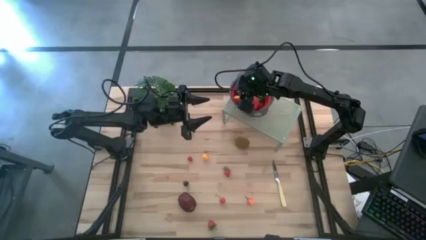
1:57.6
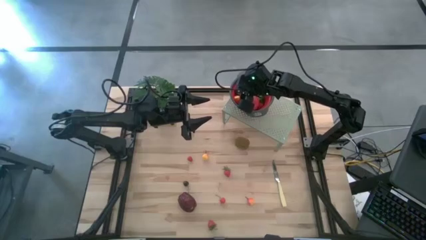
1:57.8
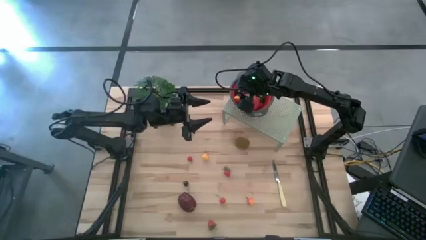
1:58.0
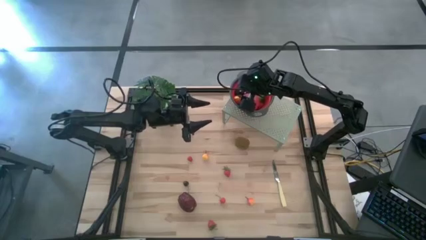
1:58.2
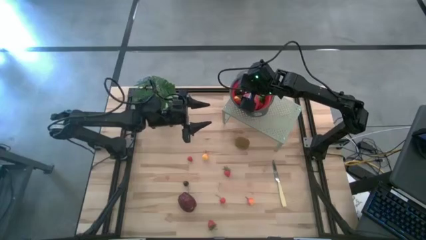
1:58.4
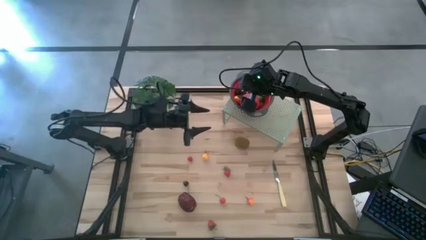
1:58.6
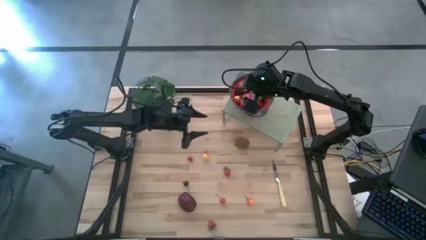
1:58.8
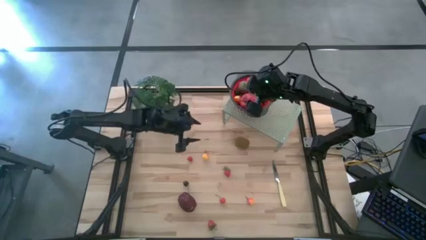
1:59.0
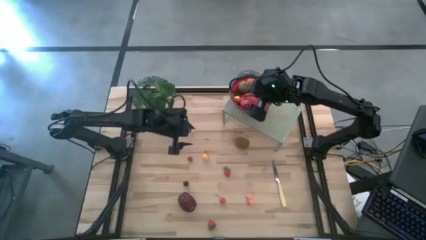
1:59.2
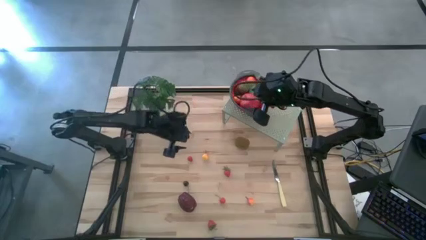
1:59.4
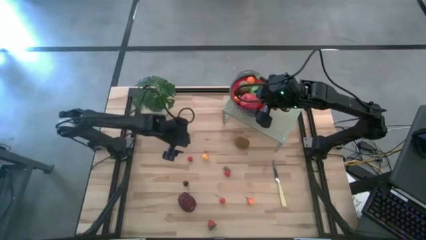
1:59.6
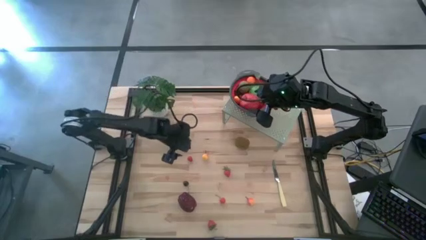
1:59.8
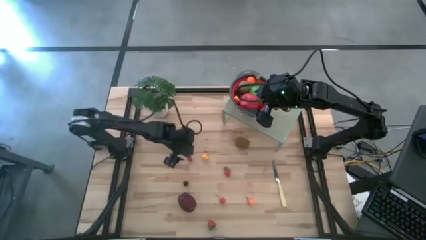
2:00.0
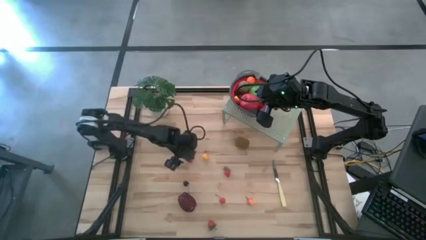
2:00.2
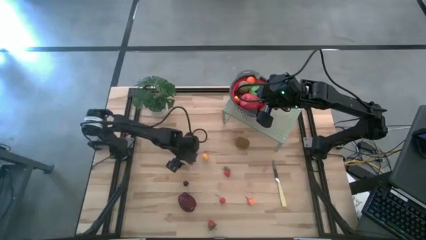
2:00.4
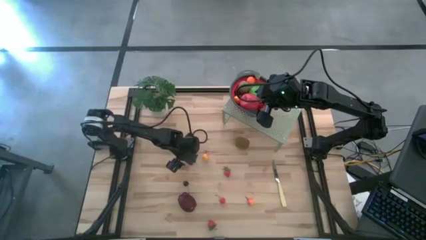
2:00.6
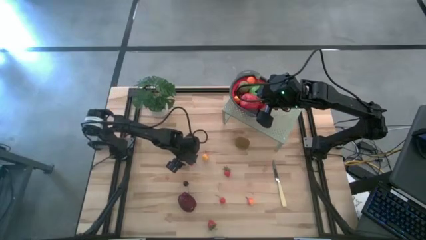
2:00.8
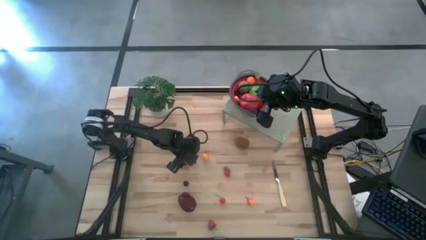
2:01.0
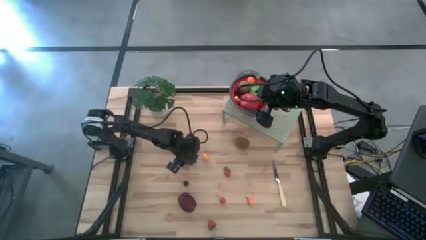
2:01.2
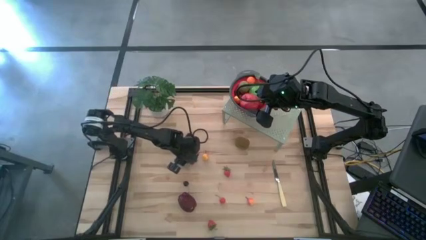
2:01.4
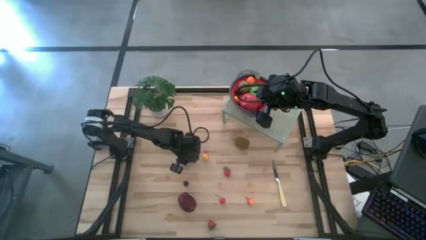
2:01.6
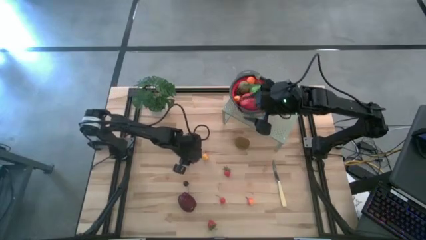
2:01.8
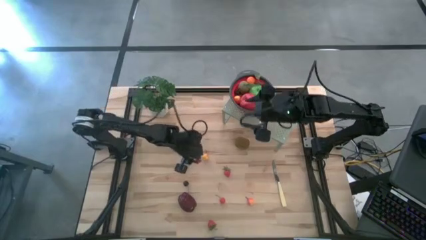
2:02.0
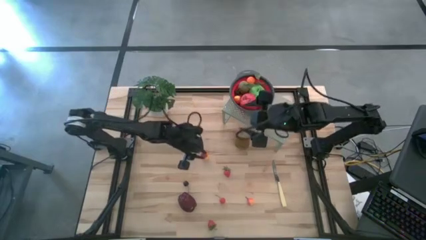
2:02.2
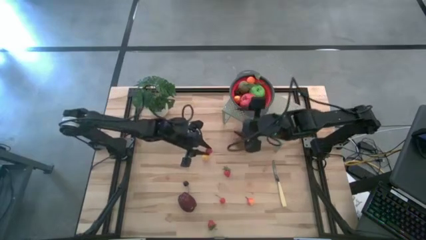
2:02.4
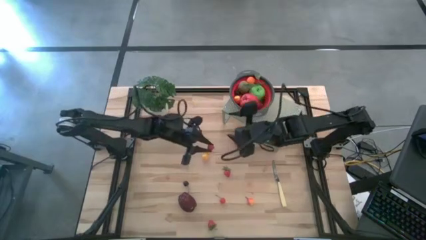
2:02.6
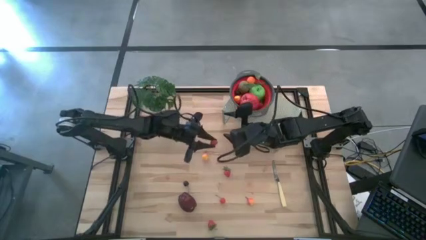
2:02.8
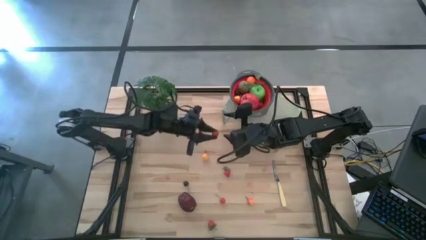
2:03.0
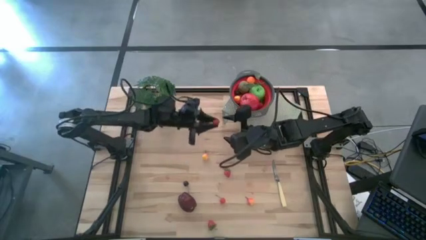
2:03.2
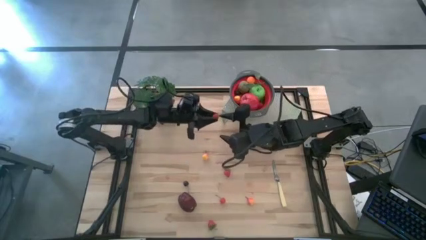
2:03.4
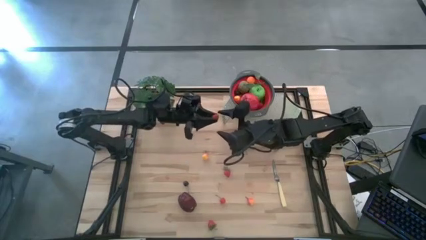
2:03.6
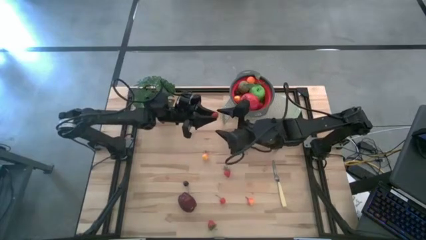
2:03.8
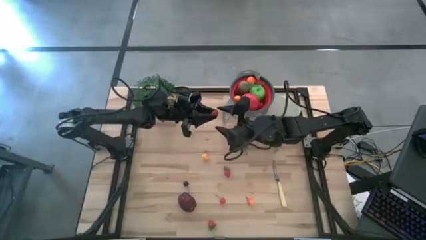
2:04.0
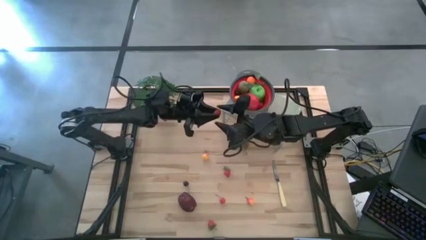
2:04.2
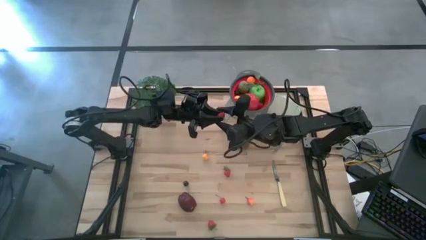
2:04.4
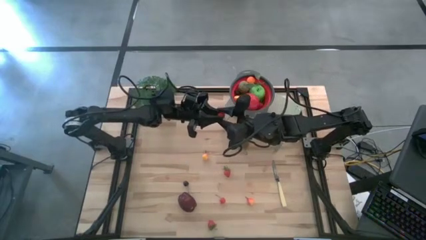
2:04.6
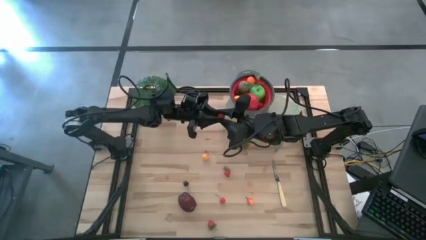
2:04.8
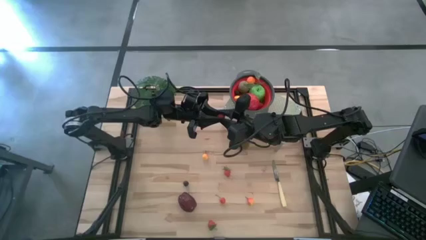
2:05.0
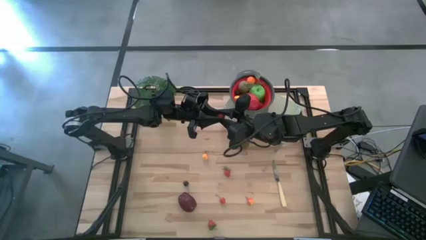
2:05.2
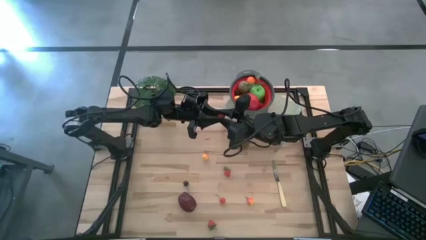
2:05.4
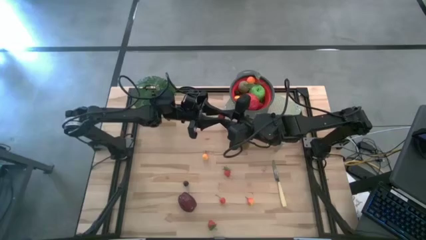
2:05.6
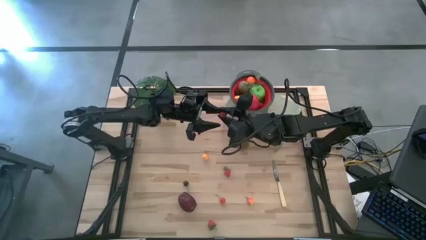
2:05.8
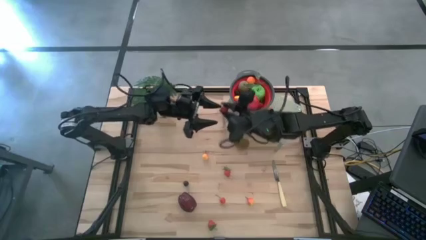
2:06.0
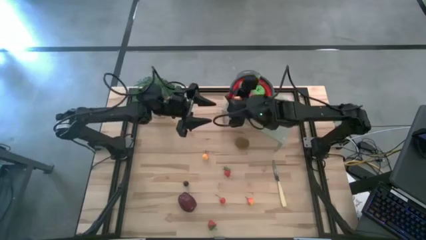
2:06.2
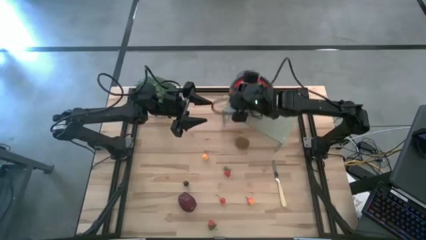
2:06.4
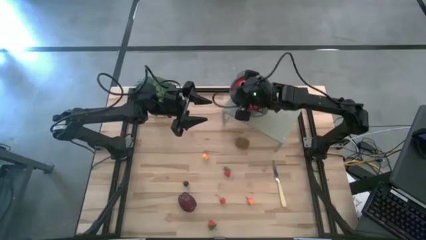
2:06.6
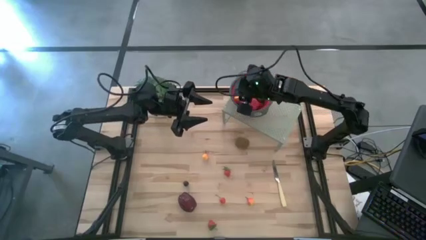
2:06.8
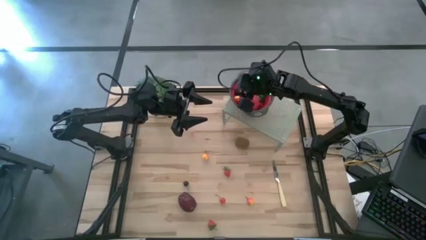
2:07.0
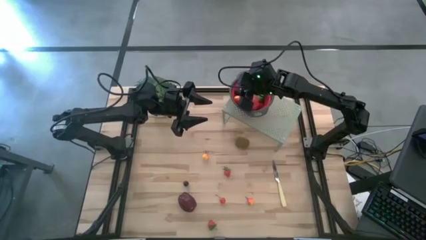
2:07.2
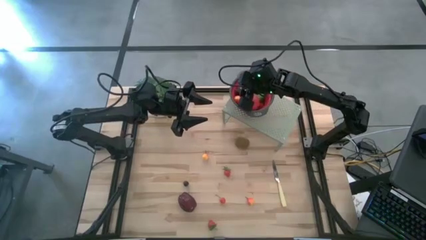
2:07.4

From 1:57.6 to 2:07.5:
Task: Pick & Place Fruit
Put the red blackberry into the red strainer bowl

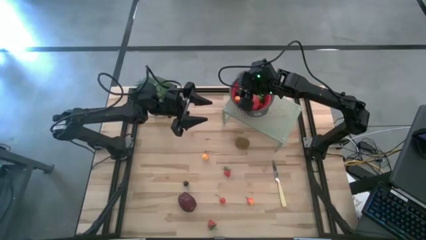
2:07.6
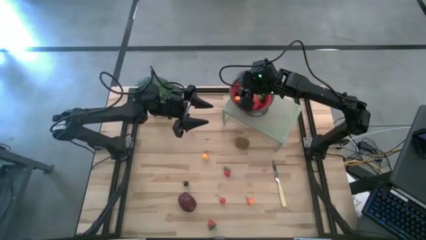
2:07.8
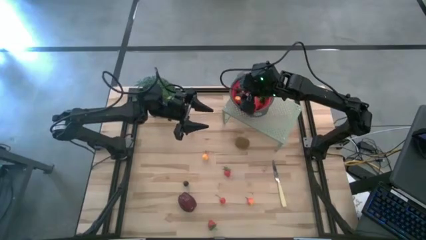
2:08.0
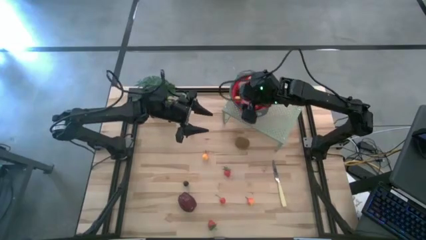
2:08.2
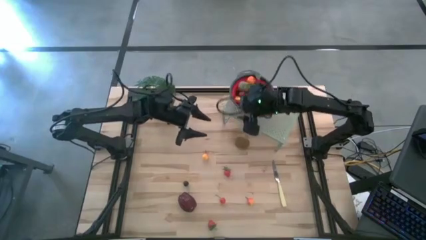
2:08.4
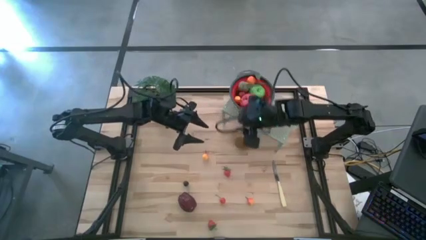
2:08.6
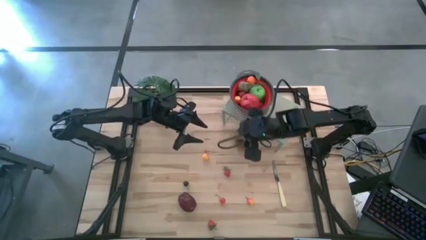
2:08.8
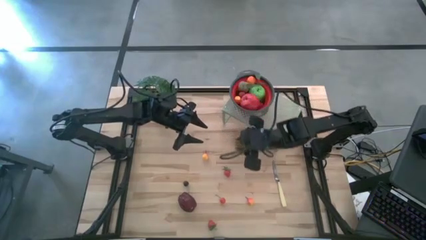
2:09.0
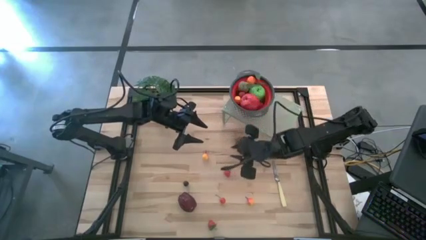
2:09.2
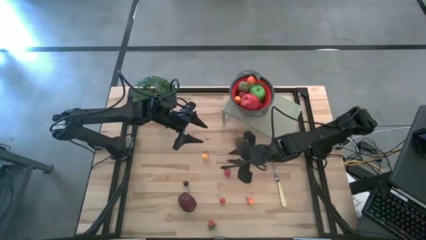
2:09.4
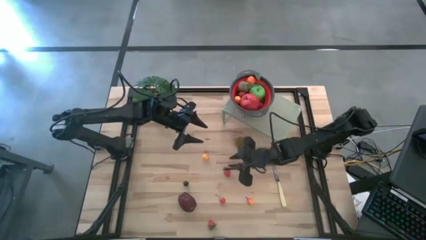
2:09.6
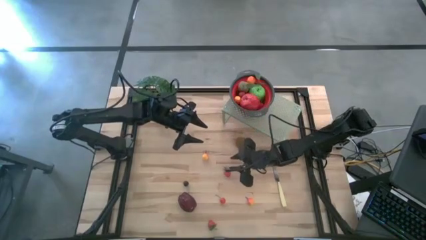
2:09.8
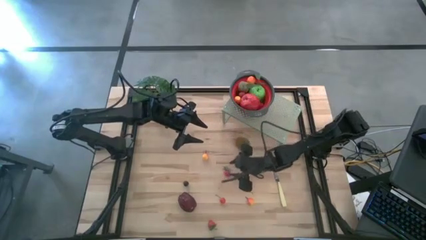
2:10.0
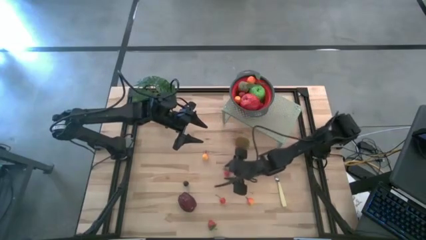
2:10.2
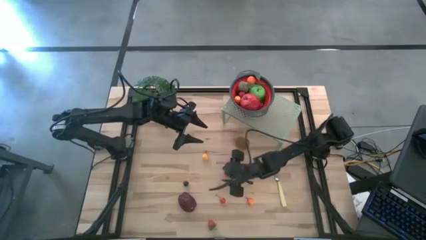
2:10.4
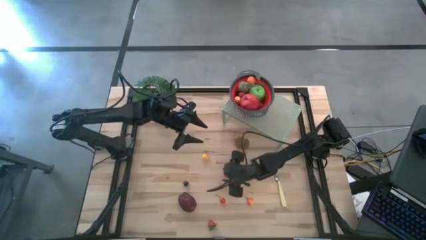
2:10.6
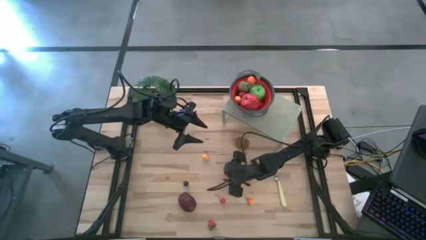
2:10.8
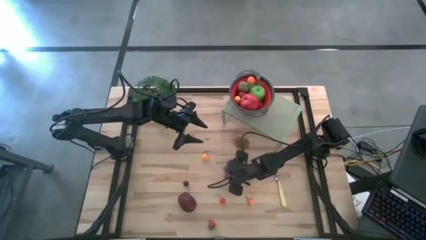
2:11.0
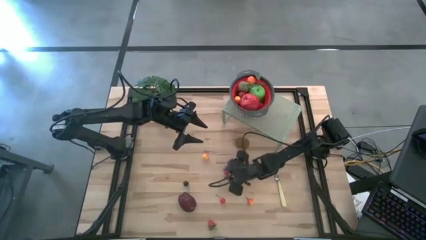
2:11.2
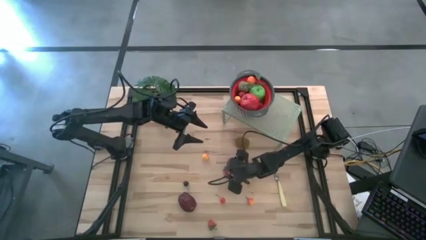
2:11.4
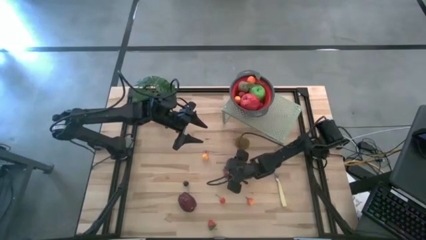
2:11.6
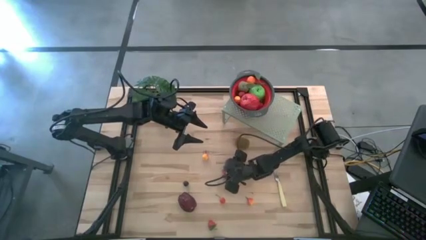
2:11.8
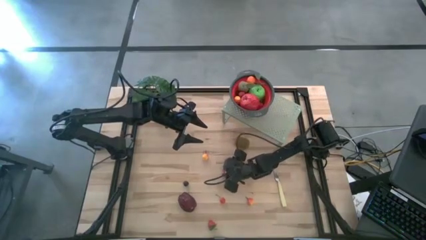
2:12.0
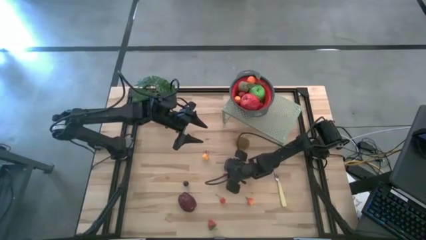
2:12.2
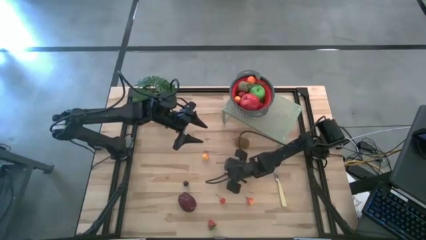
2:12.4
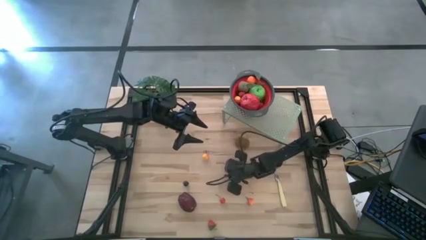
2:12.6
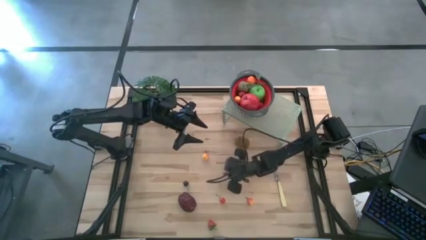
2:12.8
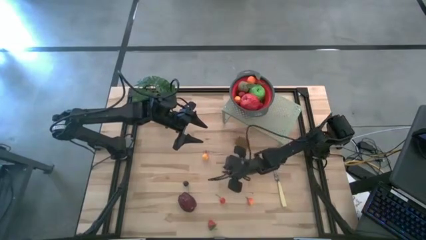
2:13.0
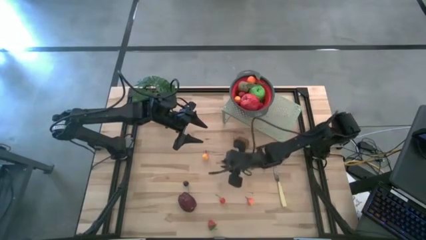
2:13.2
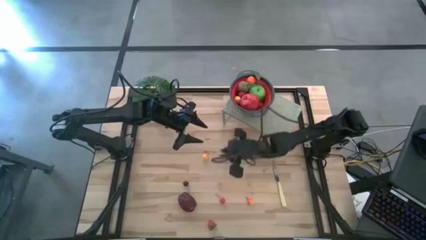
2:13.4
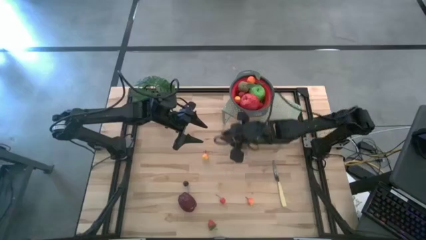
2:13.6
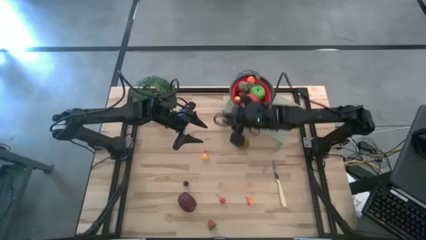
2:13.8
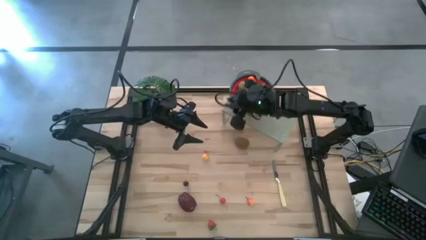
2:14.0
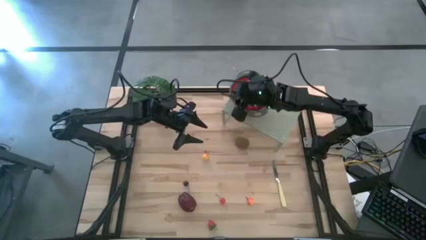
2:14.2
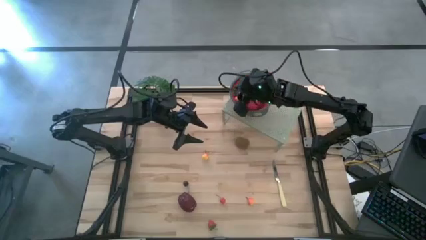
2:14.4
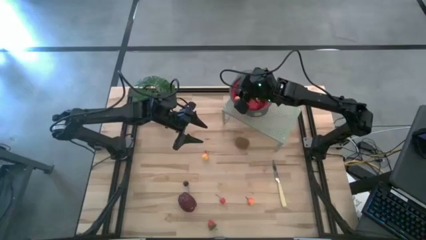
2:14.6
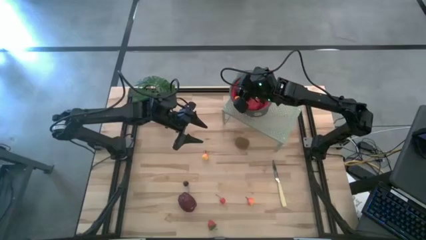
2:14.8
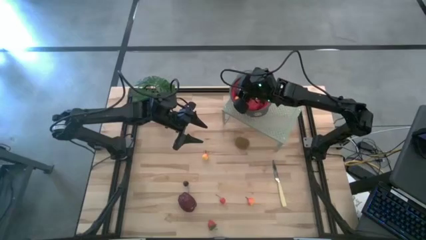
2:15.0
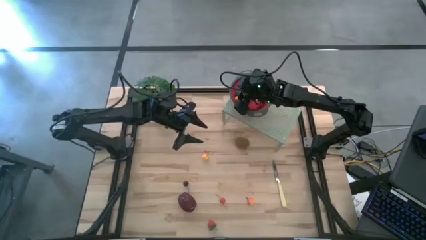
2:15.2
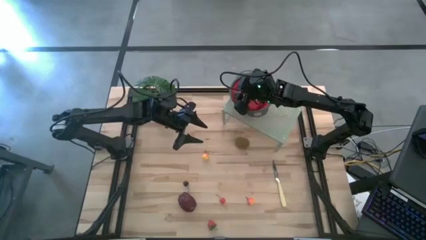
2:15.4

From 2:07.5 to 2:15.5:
Put the red strawberry into the red strainer bowl
